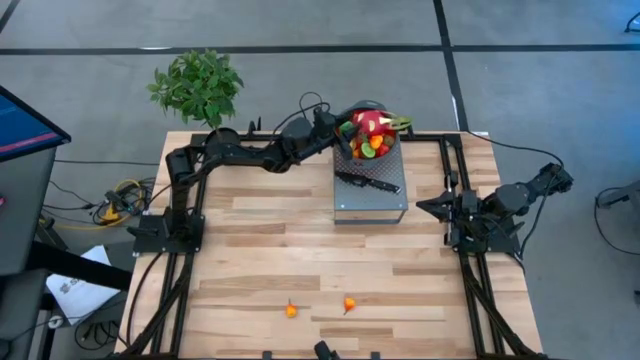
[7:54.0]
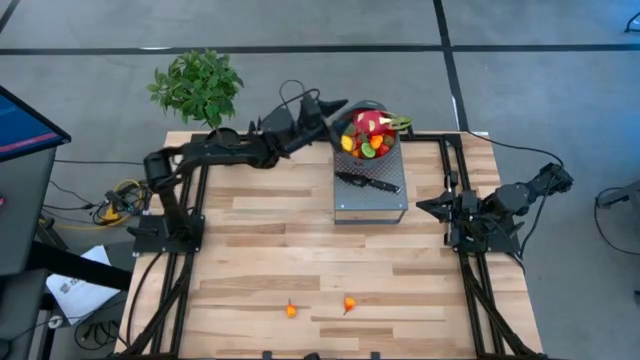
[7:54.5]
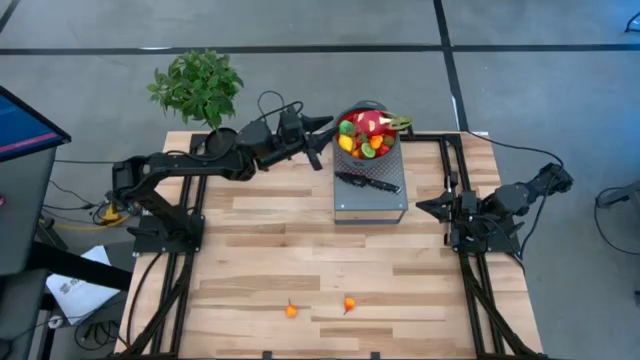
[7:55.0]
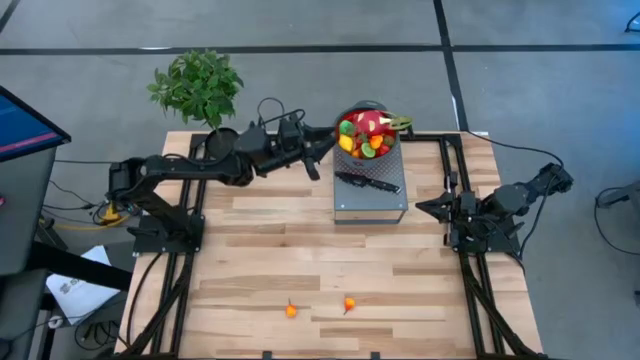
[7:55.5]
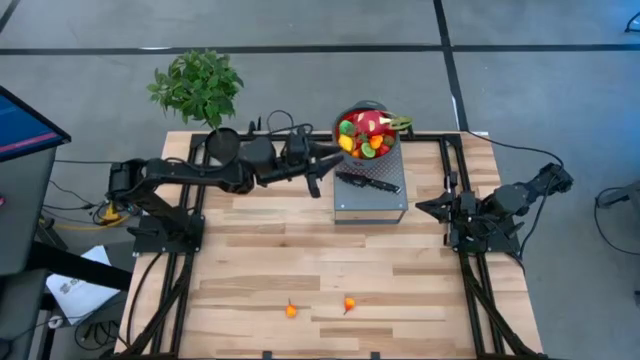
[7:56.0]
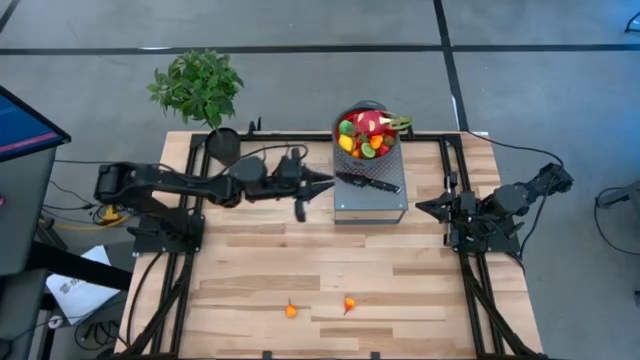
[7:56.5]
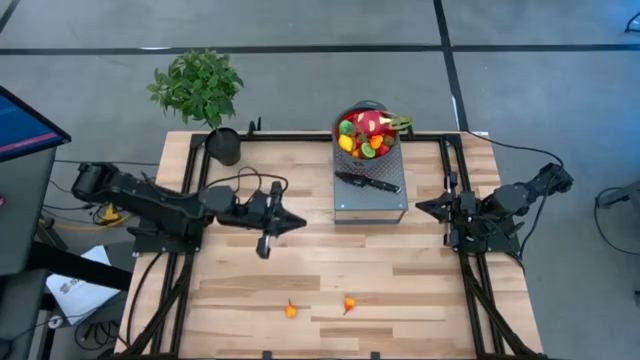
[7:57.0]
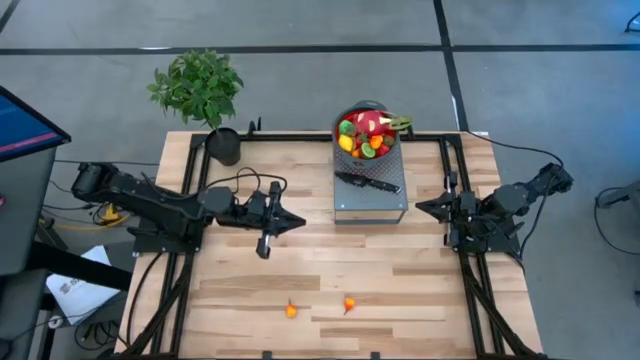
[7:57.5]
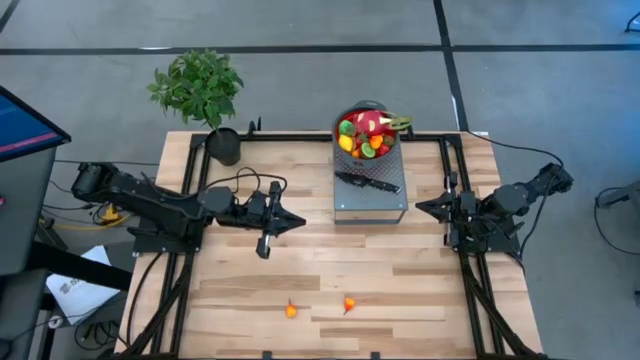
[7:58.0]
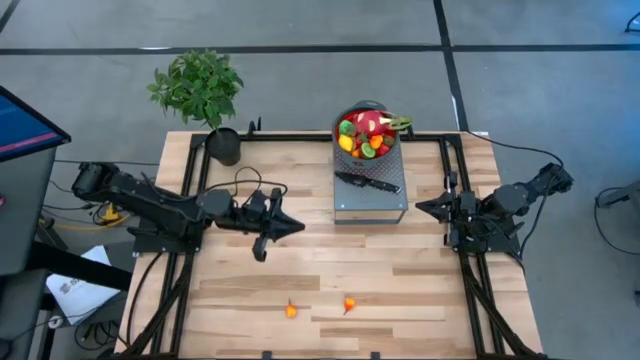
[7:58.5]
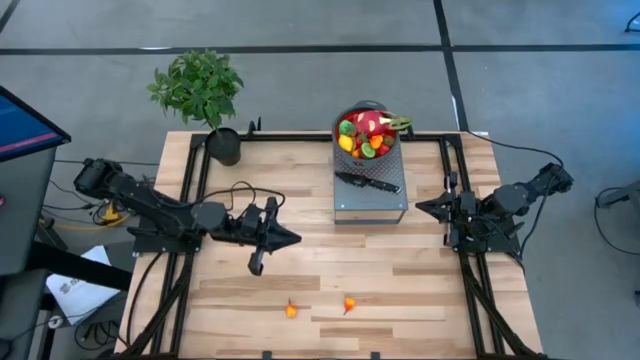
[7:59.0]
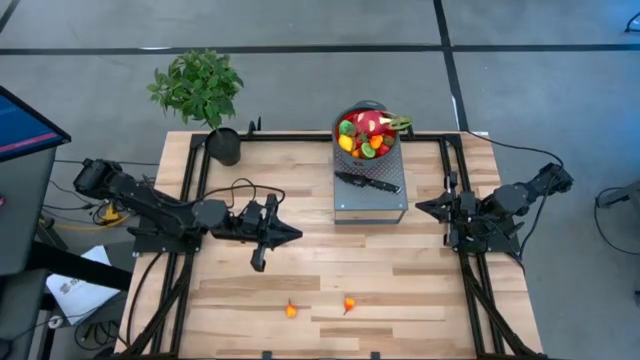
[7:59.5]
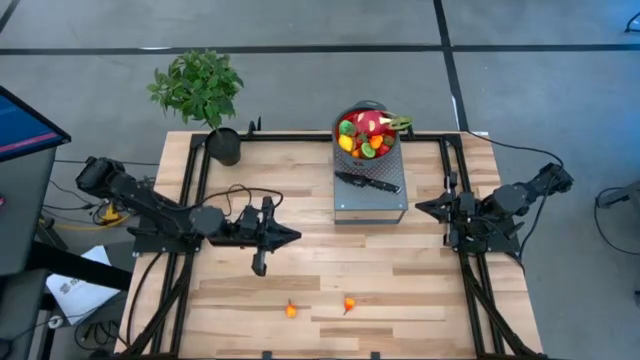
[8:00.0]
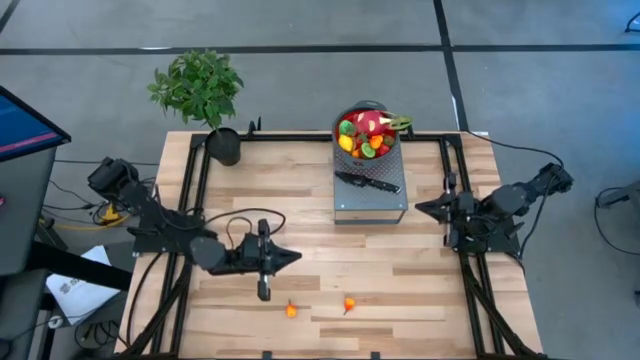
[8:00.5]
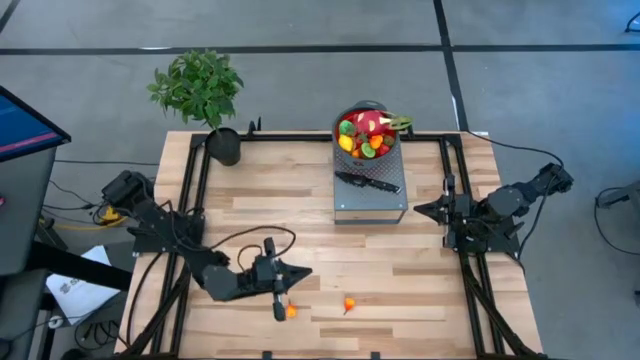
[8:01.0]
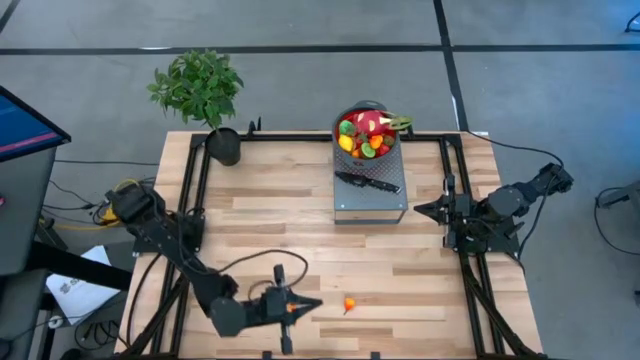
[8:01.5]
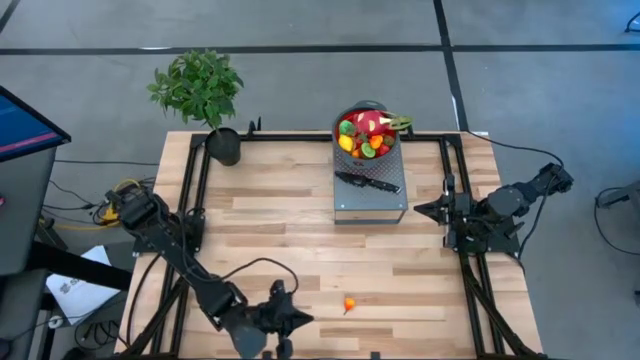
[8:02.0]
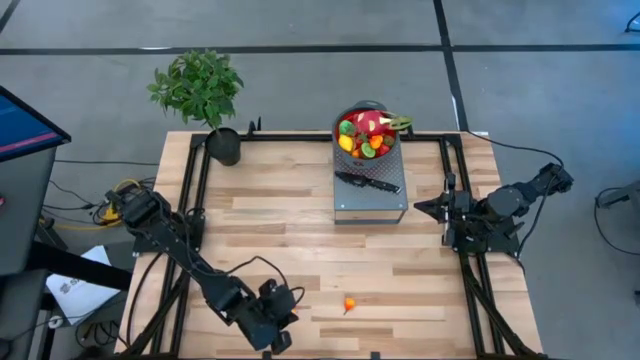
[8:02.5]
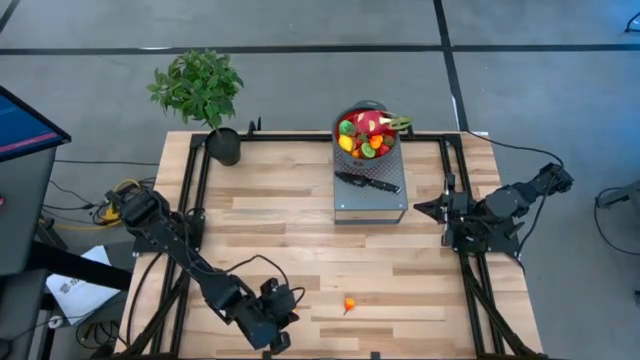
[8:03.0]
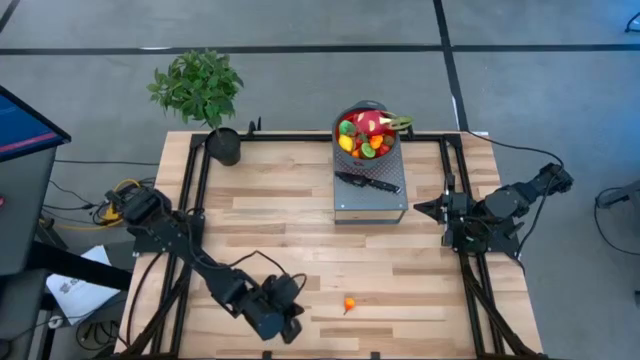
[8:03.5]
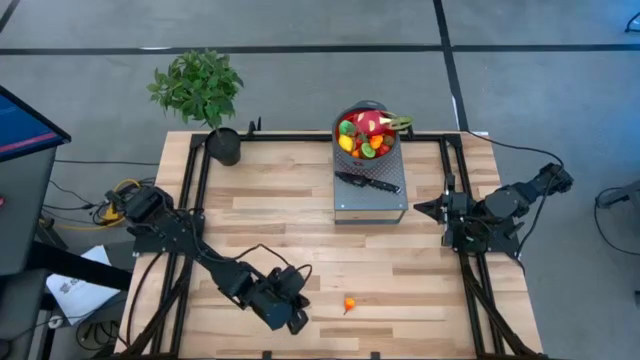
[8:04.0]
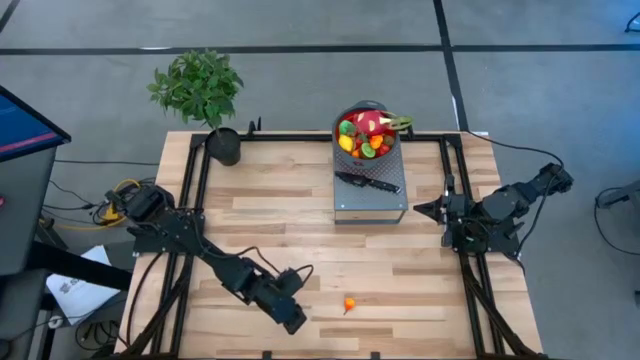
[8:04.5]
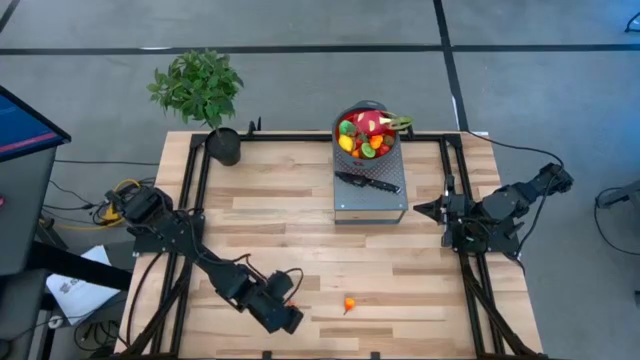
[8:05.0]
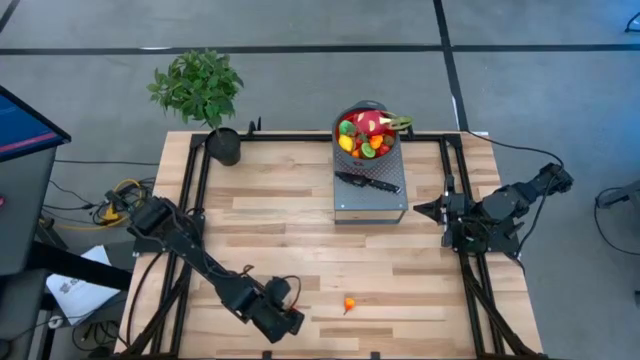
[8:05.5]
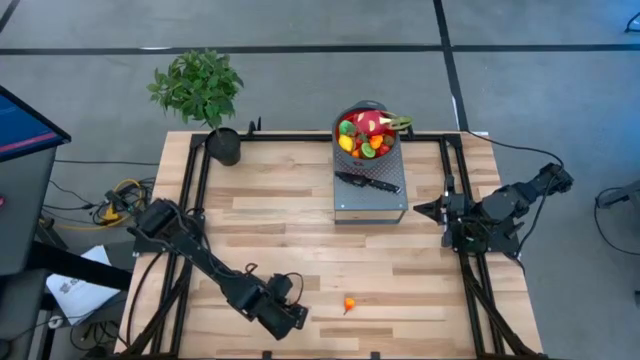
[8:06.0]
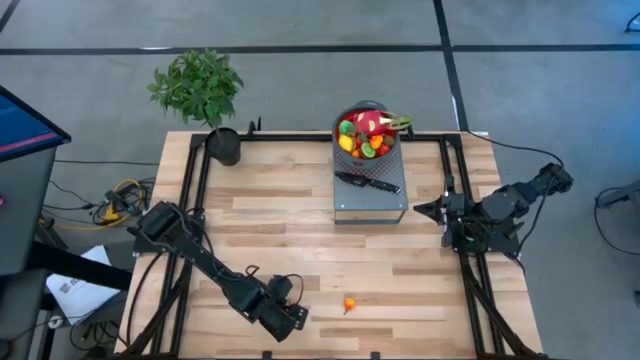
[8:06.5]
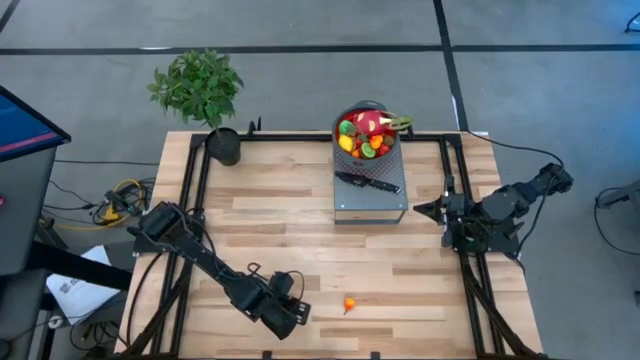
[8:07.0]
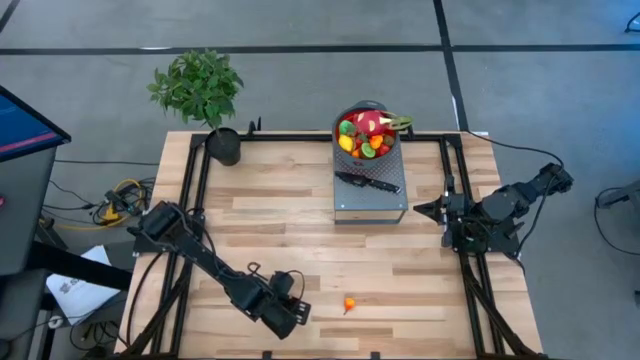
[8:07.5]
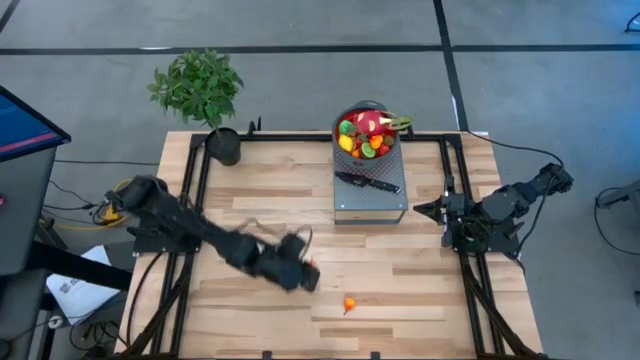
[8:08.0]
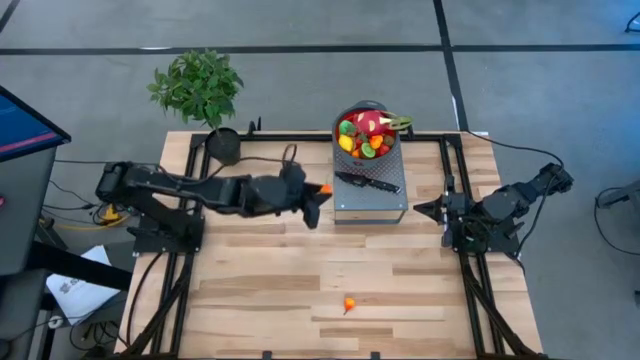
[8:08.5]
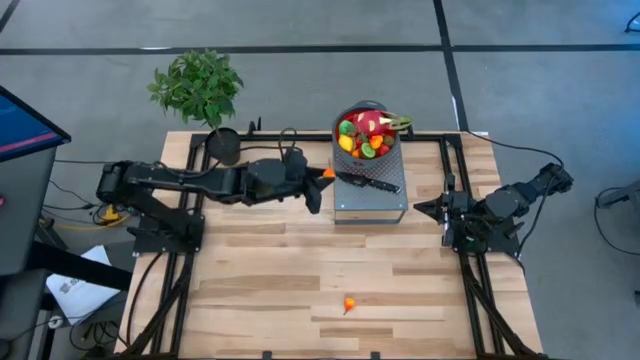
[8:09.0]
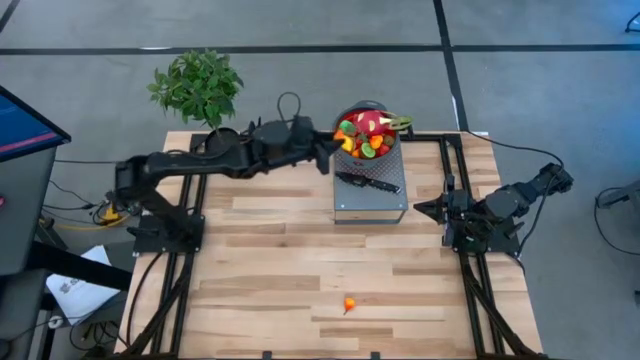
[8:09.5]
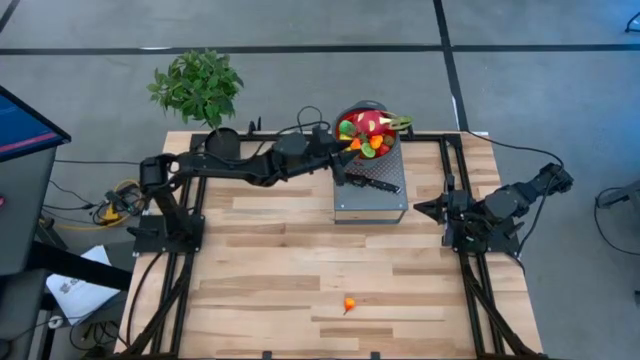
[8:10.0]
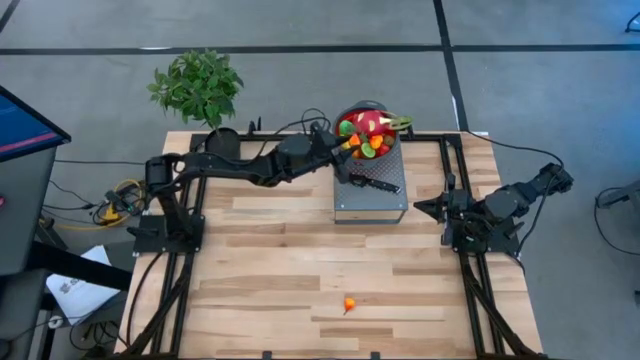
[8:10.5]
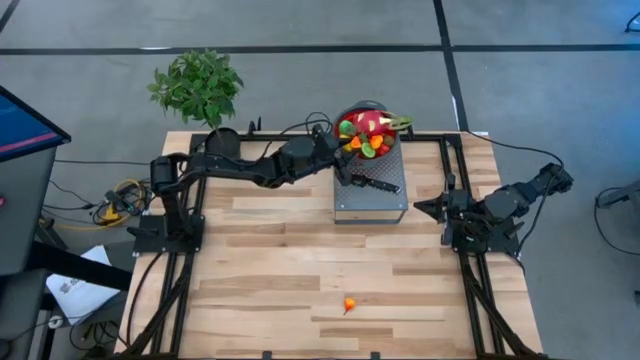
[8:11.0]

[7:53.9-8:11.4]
Task: Pick & Place Fruit
Put the yellow pear into the red colander on the shelf

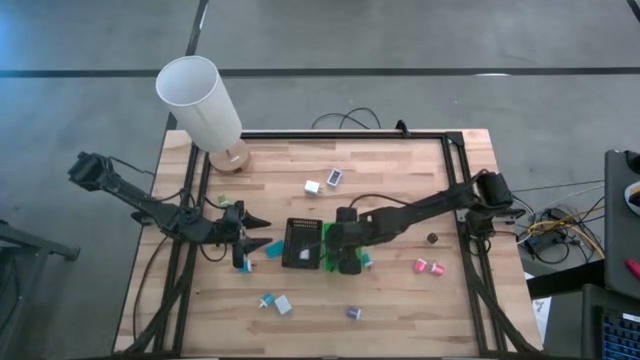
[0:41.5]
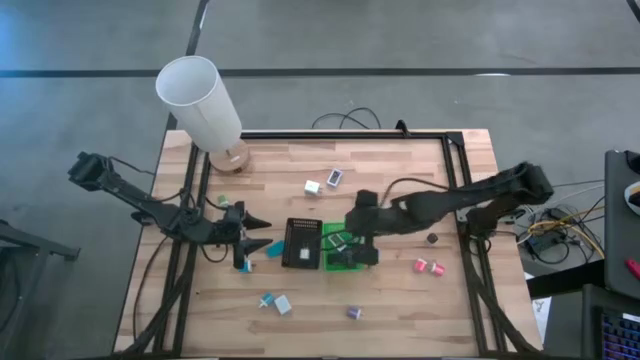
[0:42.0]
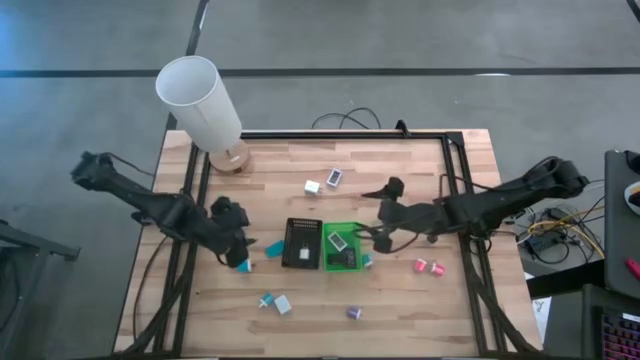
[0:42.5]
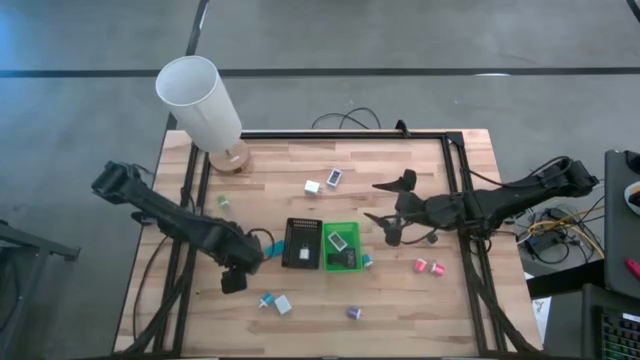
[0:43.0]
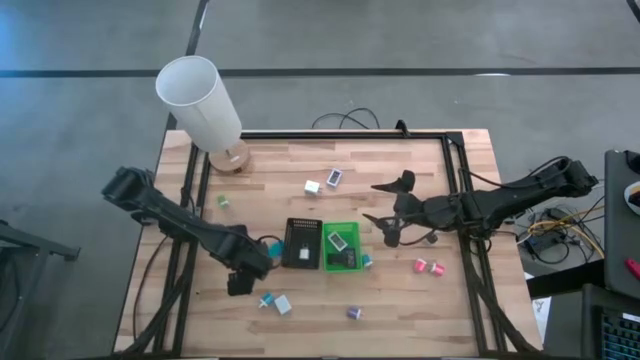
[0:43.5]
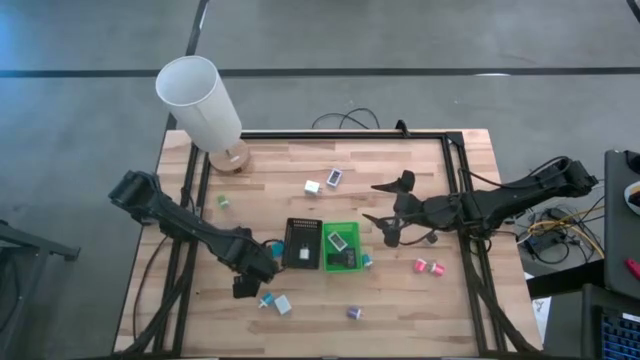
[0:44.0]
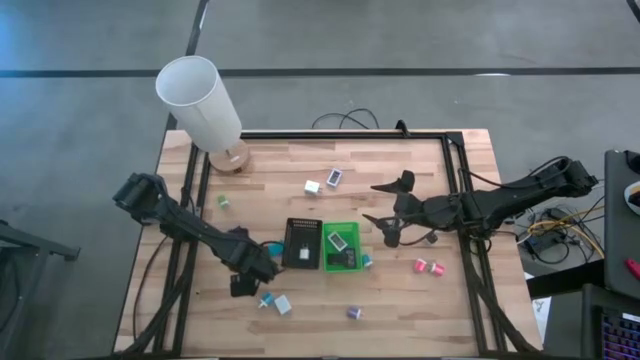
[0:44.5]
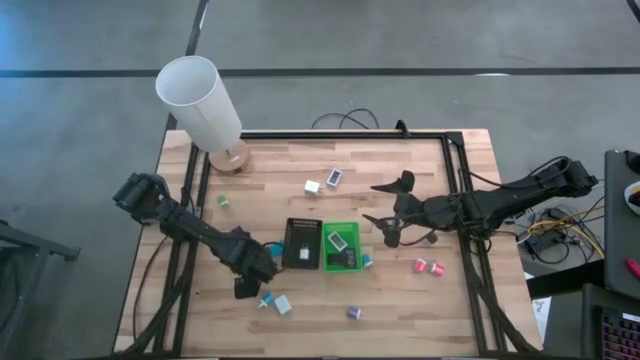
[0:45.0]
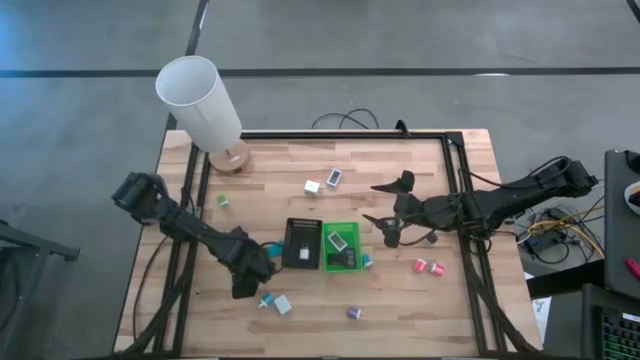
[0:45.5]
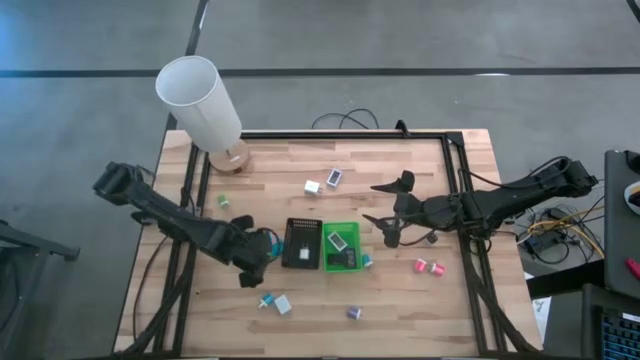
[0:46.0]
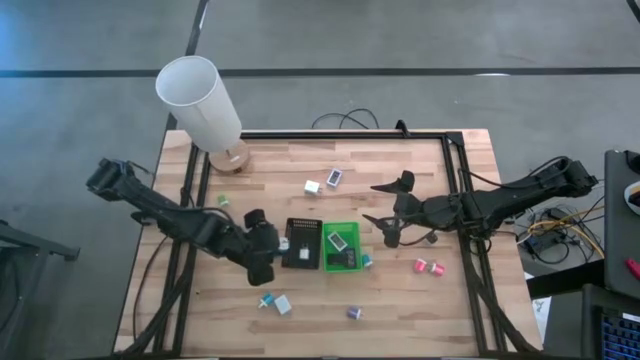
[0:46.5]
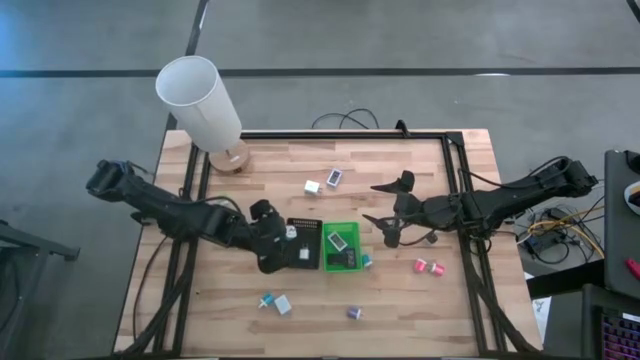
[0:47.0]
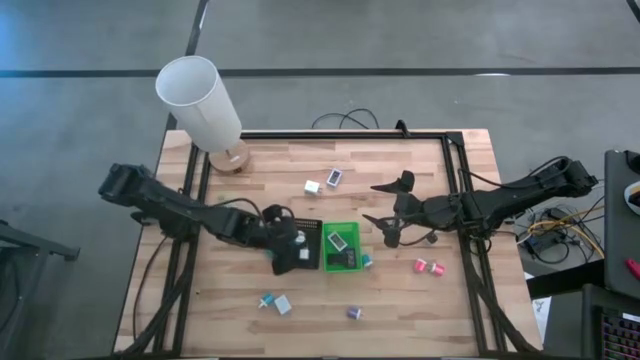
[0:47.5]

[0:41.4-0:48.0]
Task: Pick & Place Office items
Put the blue white charger adapter into the black bin
